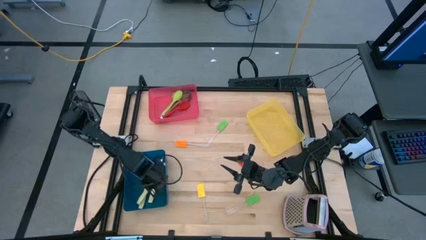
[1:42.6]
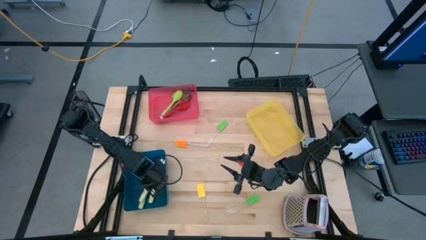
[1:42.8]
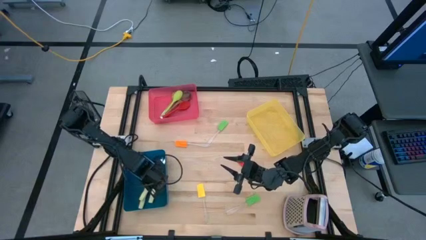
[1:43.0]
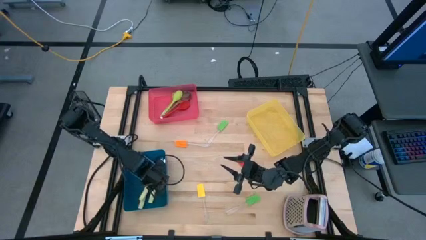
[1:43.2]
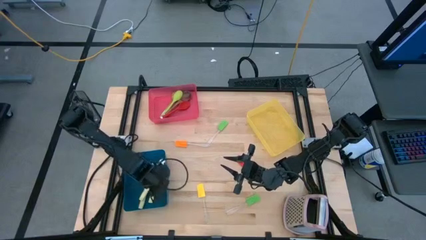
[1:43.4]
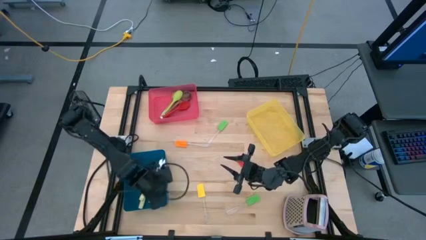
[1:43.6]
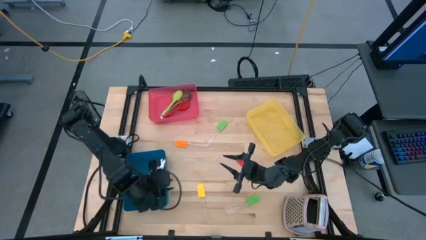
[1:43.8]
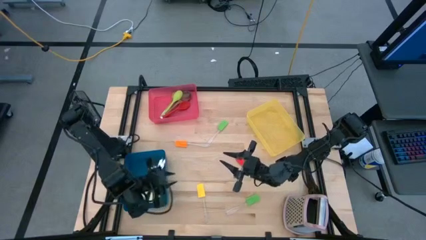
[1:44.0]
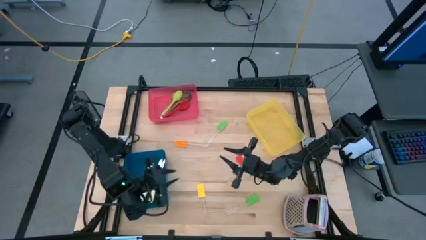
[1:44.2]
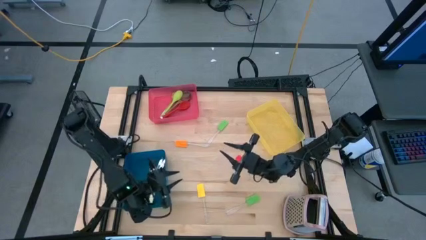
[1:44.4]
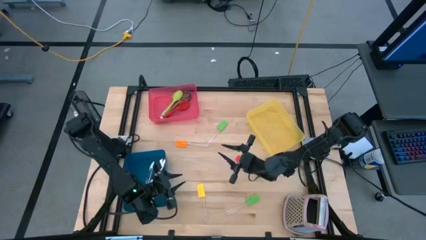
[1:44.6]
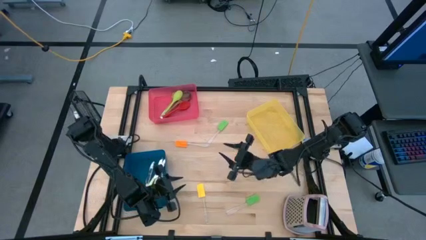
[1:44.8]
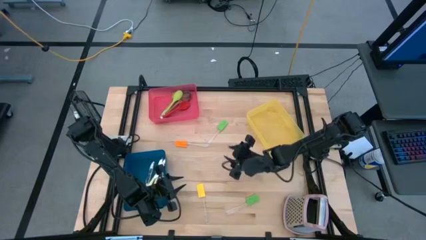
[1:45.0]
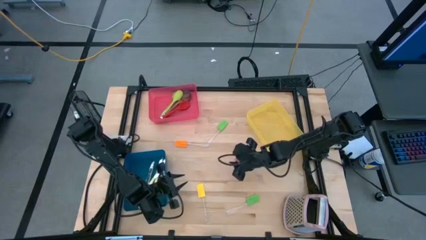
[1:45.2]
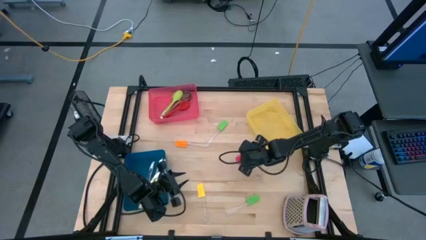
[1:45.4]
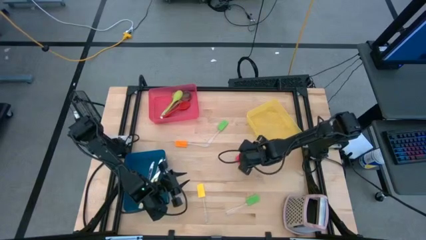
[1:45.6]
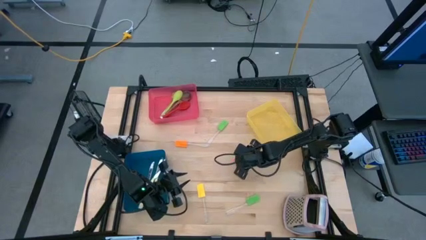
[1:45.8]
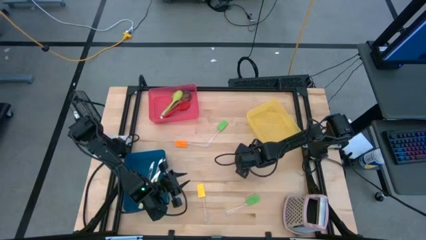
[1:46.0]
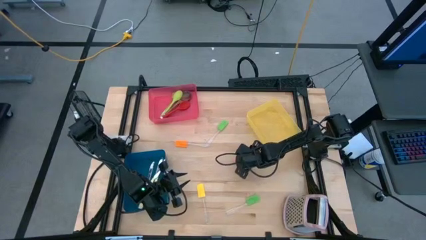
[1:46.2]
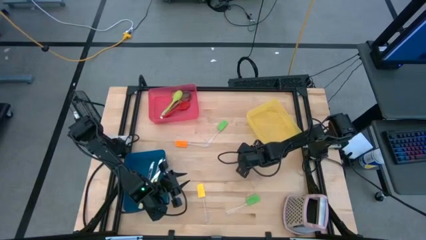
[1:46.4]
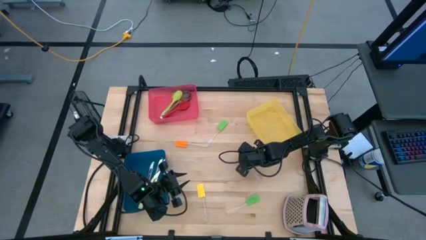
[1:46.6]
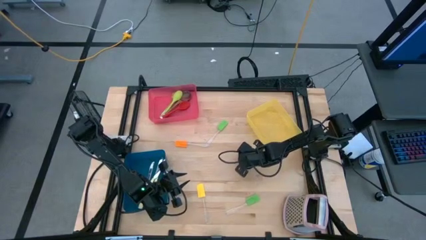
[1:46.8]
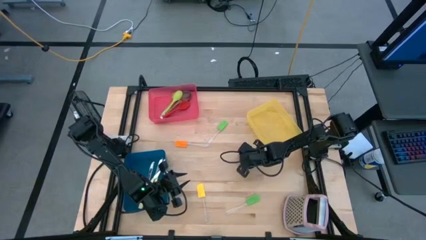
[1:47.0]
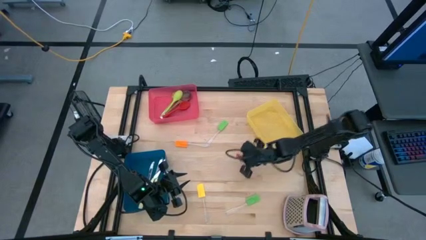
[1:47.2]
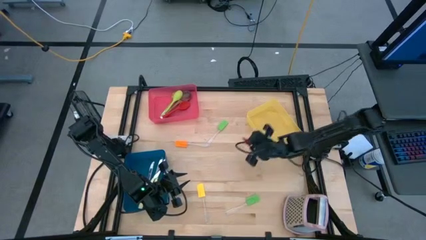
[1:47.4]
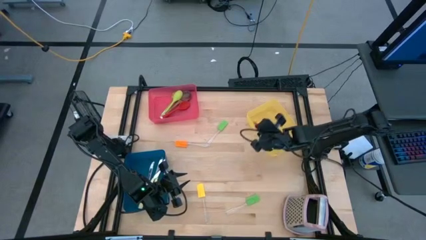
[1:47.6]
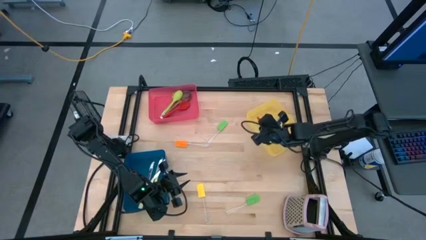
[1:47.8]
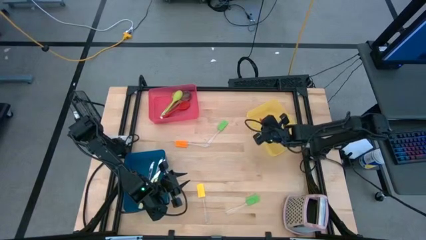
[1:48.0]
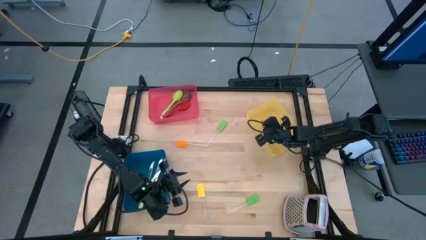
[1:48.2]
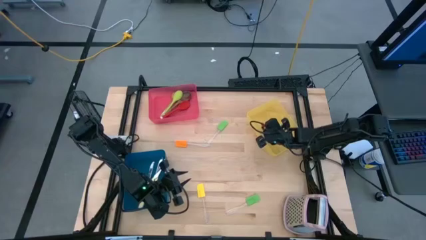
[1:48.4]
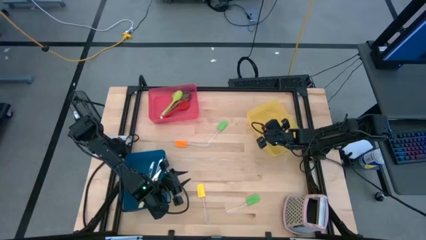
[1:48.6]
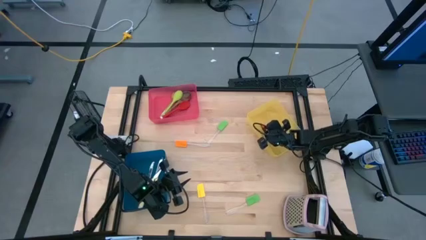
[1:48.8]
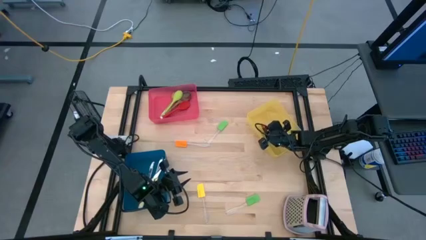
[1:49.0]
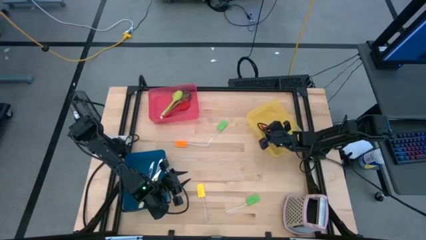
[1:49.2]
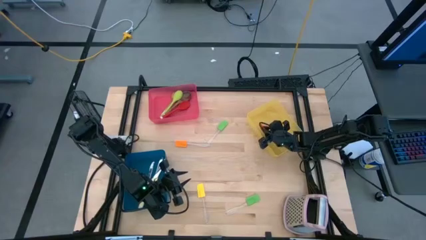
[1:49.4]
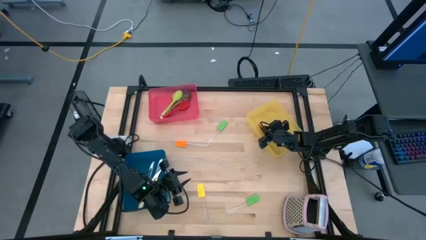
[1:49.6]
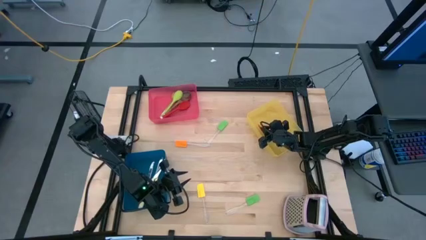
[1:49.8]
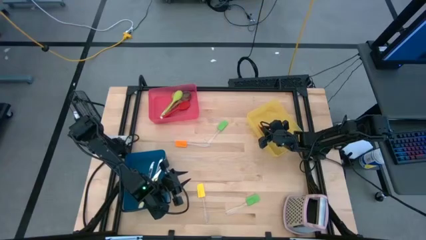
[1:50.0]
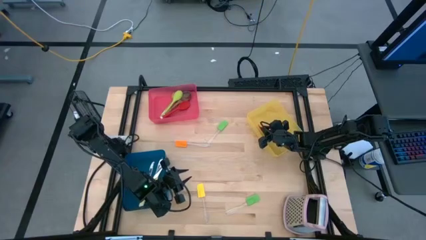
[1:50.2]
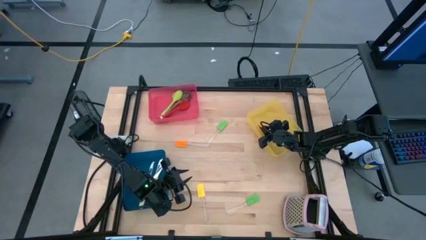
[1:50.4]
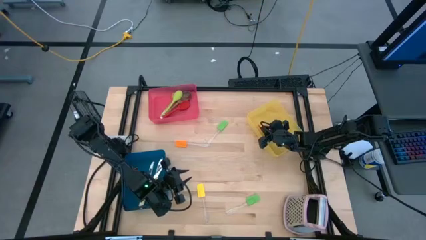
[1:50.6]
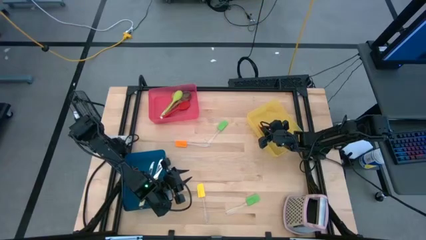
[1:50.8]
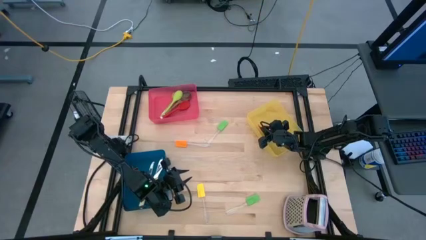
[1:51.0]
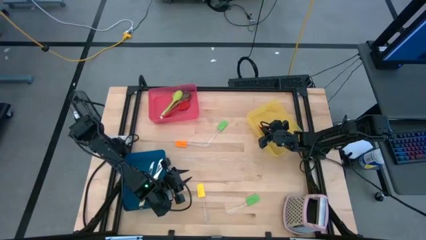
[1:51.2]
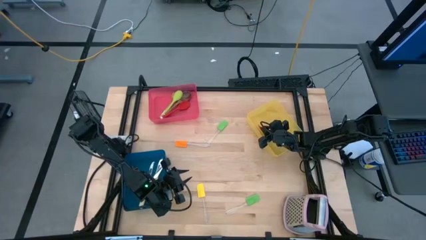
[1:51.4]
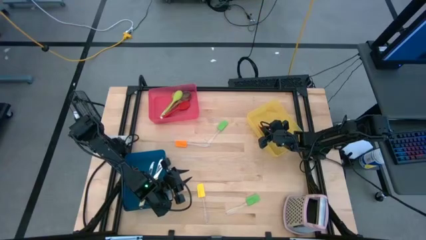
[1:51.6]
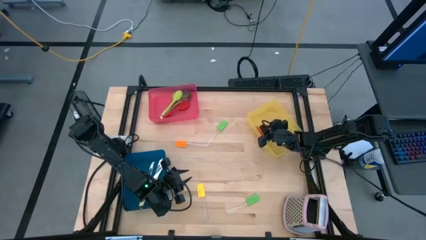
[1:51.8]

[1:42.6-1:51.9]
Task: Pick & Place Kitchen Items
Put the red spatula into the yellow bin

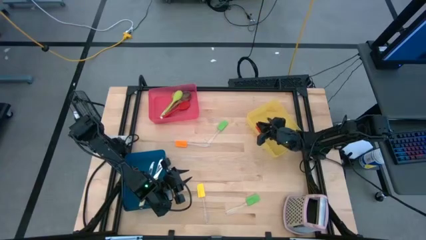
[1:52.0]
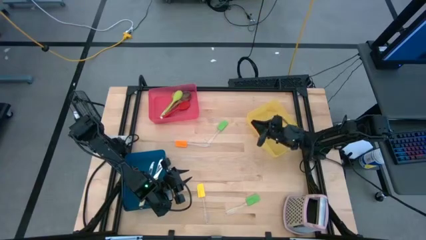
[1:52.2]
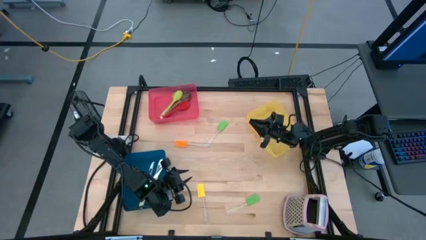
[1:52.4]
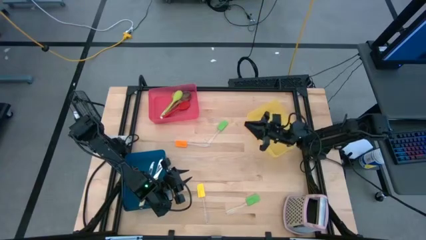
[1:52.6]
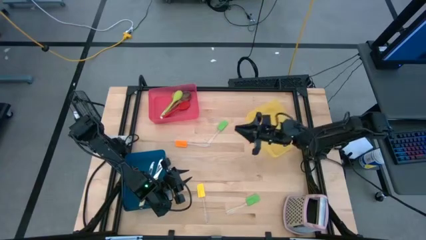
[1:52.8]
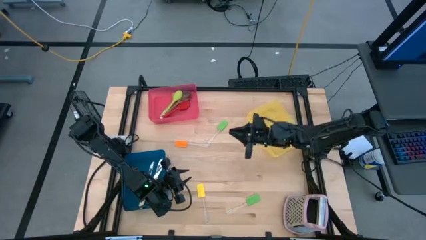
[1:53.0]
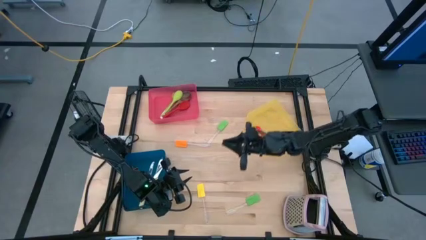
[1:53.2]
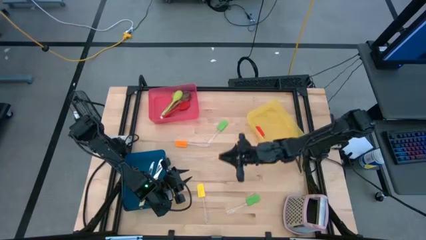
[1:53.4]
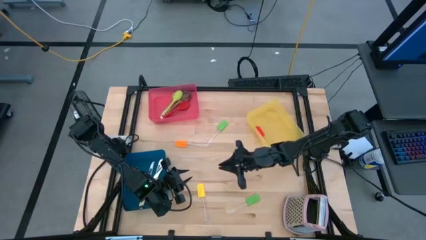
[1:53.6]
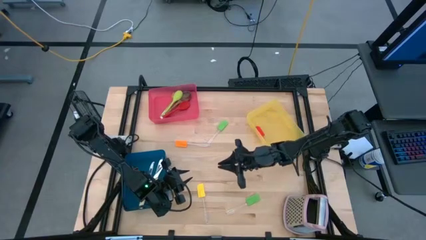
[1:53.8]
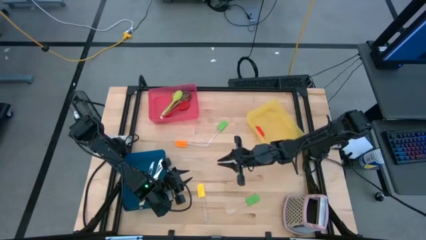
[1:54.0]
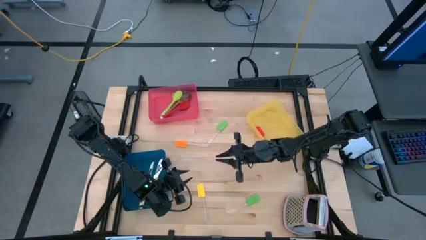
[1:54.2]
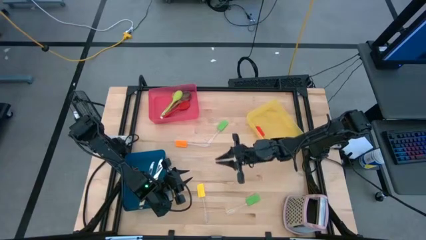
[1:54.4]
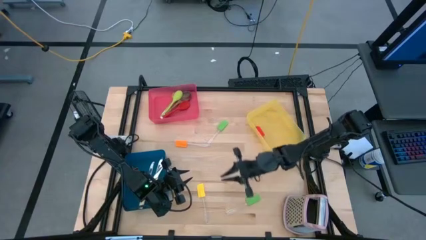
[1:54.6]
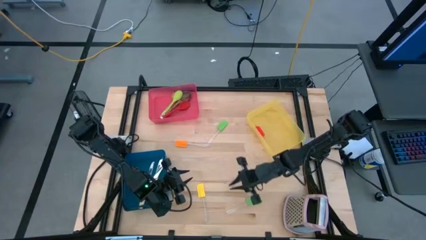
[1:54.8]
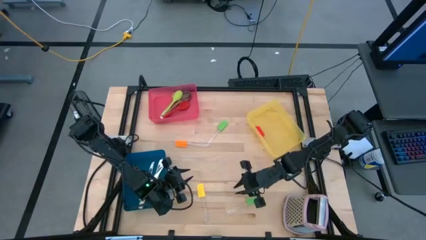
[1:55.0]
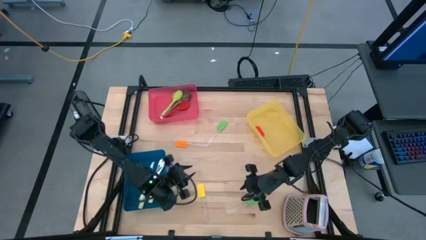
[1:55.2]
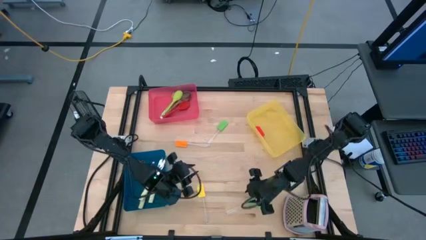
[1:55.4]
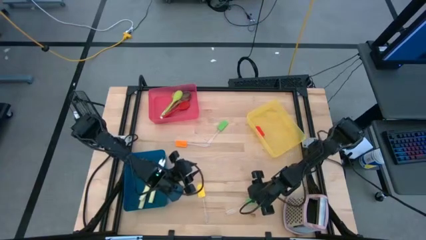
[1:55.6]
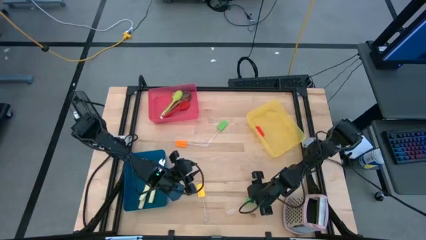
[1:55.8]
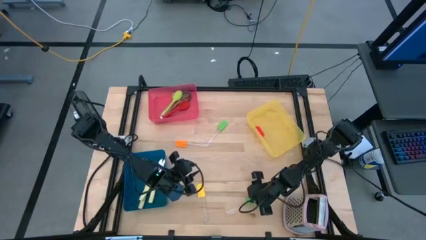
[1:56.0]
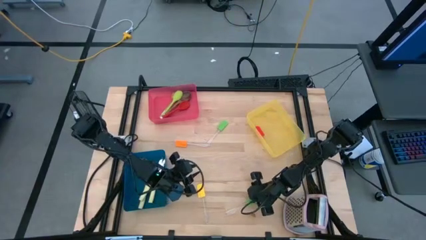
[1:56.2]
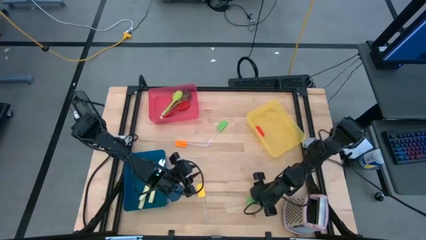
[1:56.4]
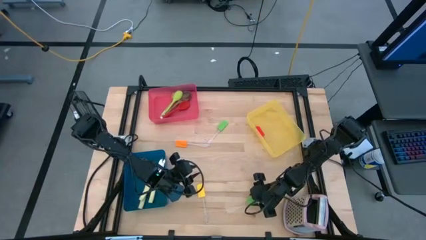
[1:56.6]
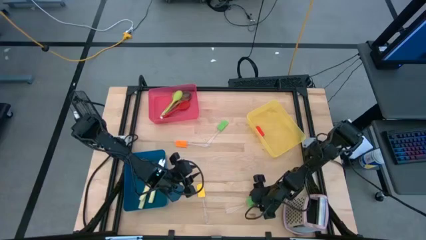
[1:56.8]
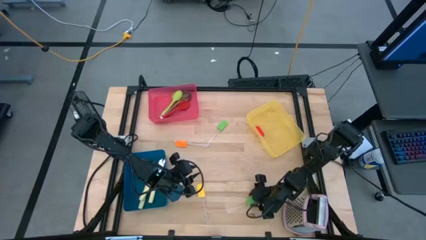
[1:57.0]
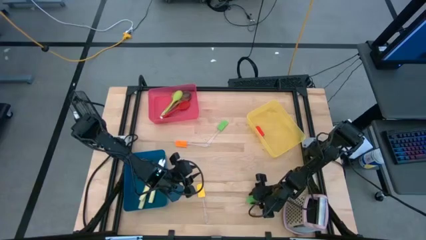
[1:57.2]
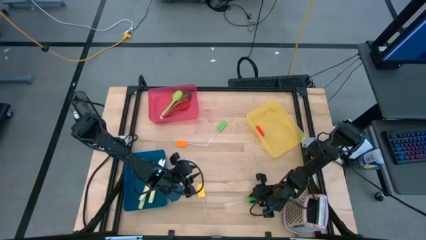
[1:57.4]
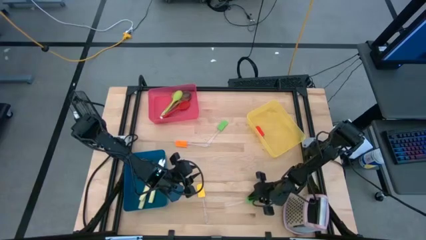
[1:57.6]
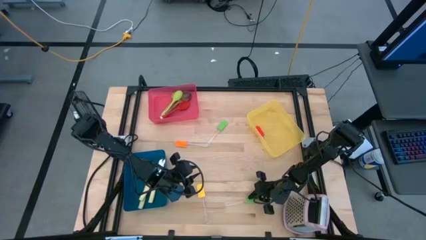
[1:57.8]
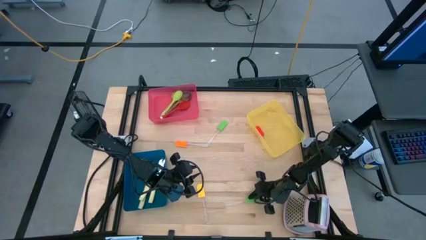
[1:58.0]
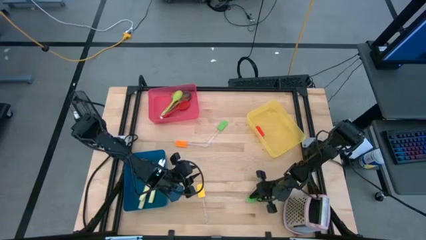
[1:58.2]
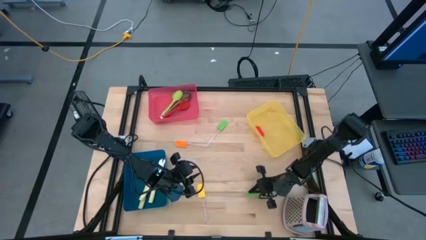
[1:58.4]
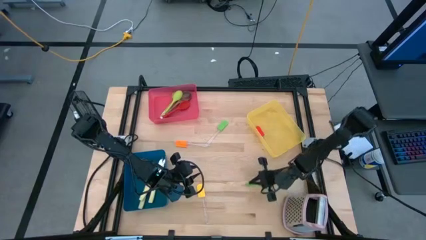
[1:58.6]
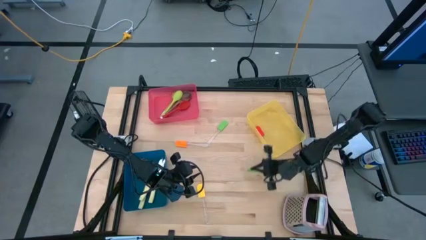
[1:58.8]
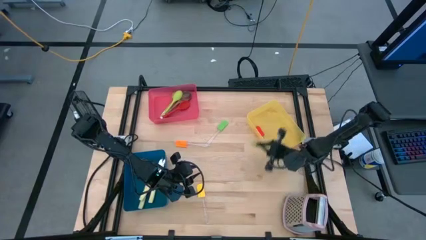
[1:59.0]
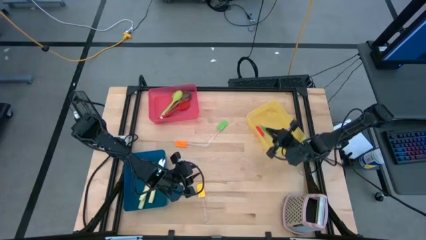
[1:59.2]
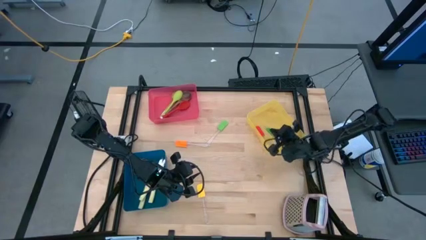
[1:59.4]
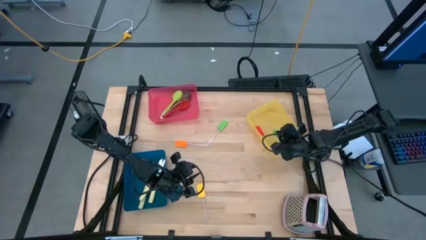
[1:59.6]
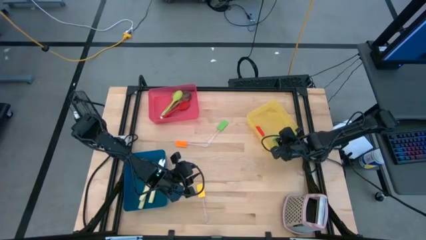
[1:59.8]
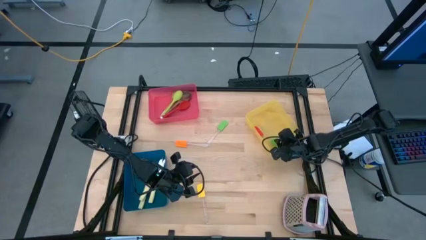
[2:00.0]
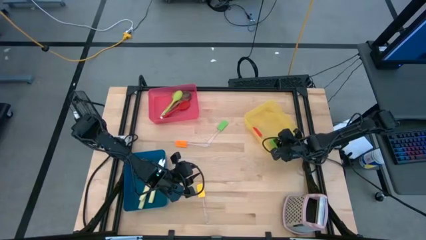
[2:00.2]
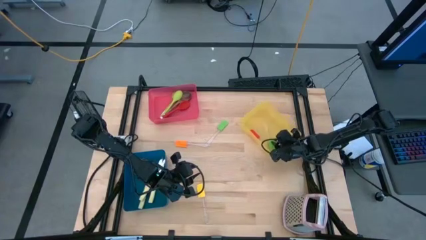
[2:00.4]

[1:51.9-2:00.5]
Put the bottom green spatula into the yellow bin
